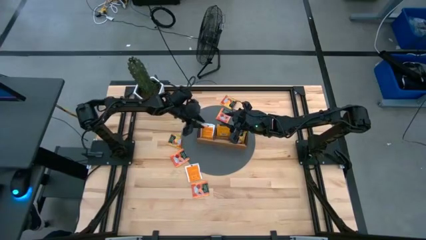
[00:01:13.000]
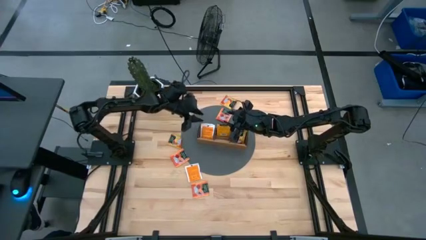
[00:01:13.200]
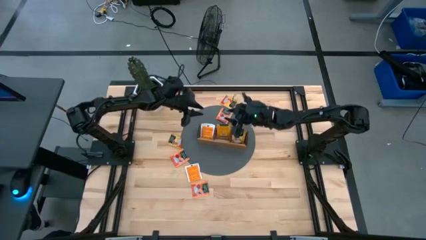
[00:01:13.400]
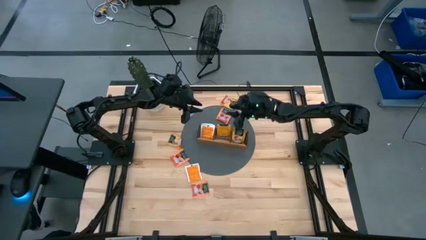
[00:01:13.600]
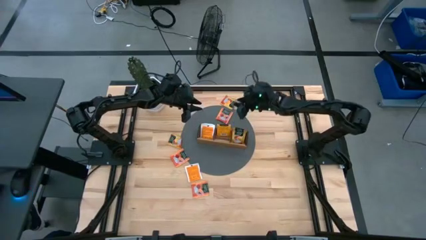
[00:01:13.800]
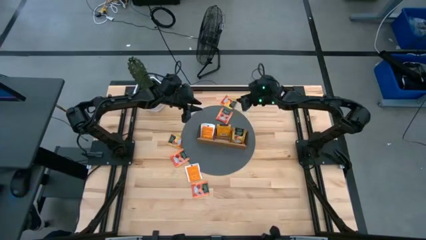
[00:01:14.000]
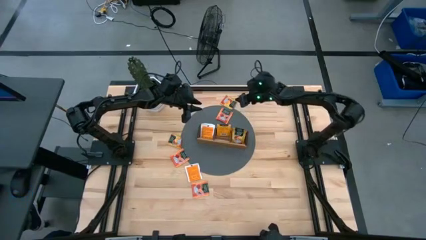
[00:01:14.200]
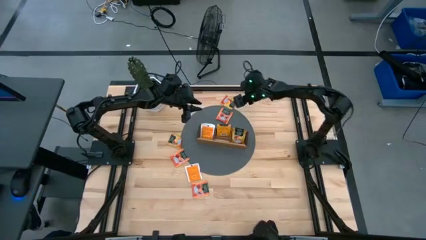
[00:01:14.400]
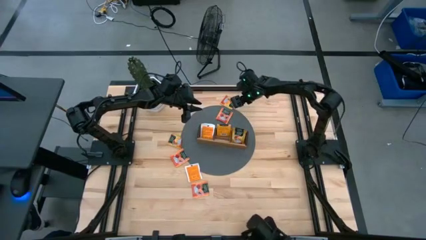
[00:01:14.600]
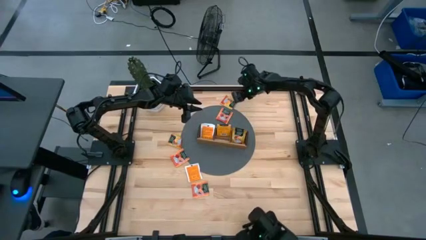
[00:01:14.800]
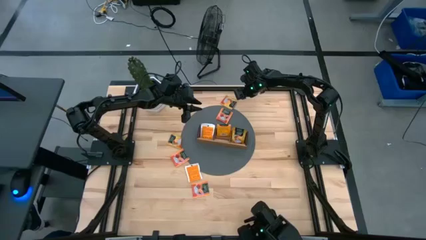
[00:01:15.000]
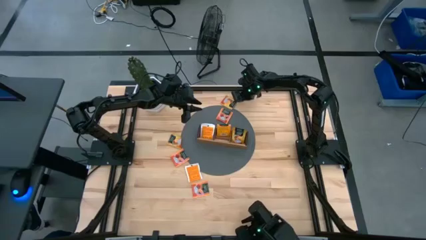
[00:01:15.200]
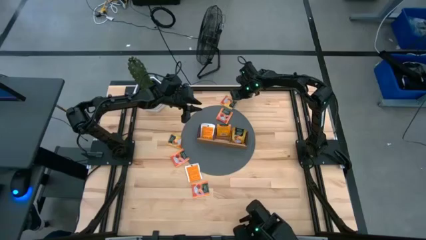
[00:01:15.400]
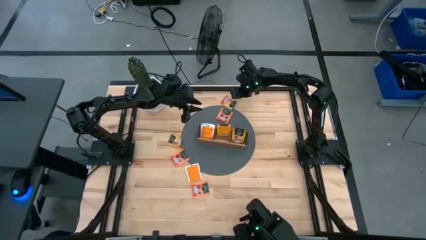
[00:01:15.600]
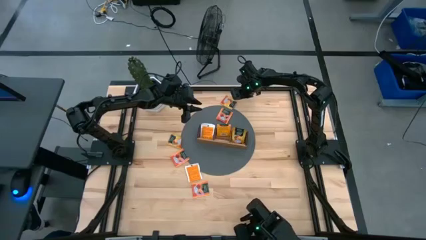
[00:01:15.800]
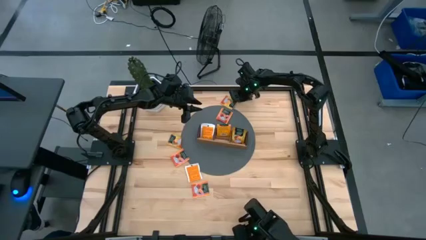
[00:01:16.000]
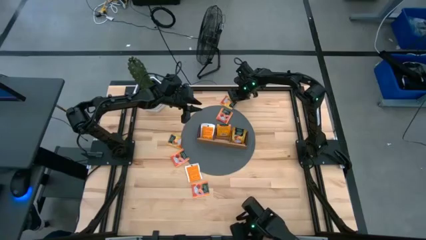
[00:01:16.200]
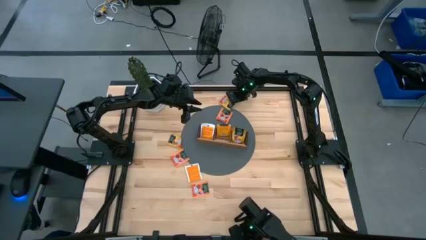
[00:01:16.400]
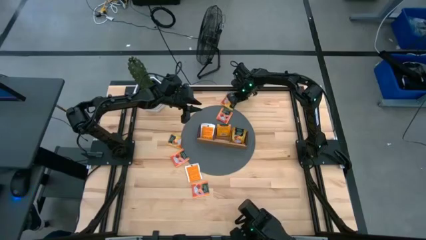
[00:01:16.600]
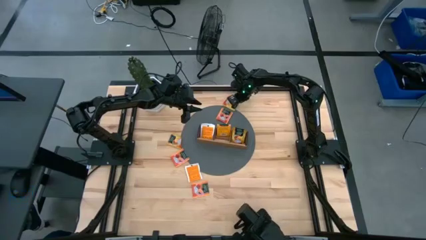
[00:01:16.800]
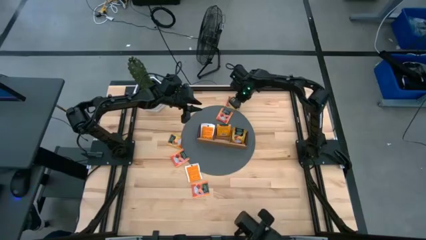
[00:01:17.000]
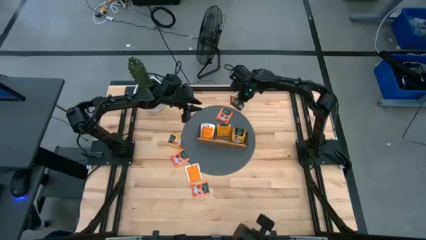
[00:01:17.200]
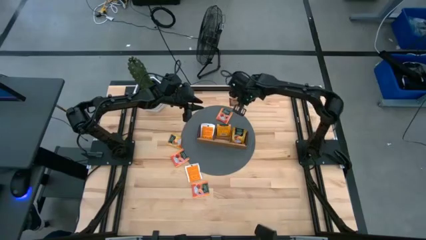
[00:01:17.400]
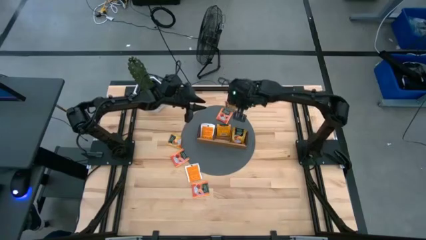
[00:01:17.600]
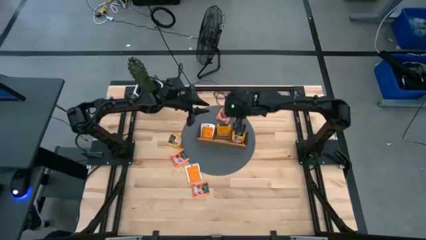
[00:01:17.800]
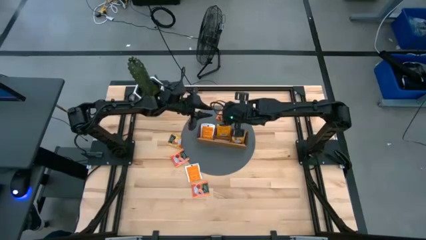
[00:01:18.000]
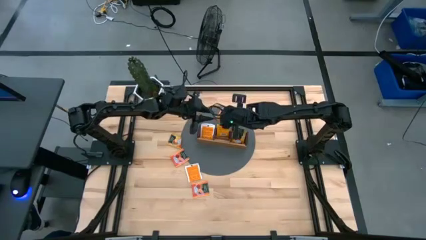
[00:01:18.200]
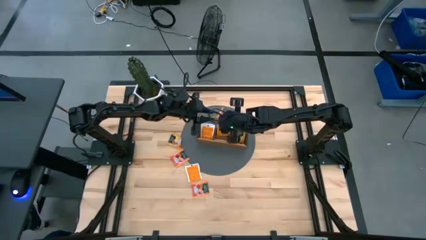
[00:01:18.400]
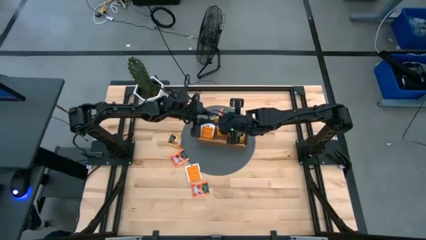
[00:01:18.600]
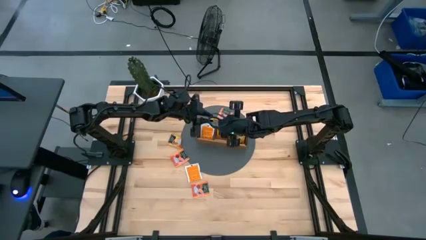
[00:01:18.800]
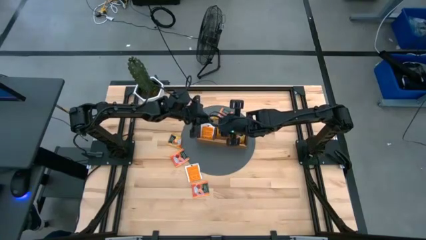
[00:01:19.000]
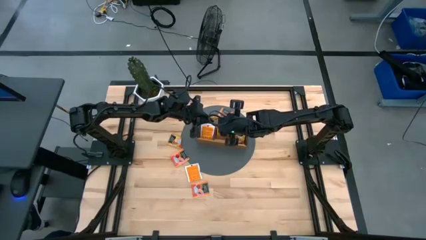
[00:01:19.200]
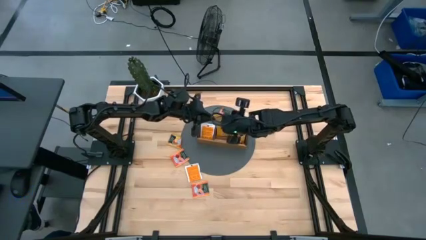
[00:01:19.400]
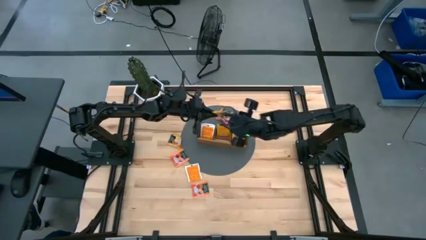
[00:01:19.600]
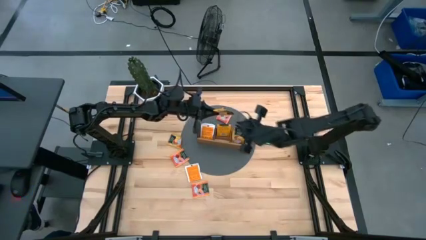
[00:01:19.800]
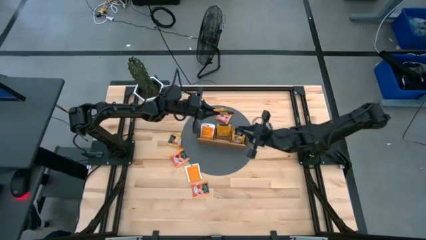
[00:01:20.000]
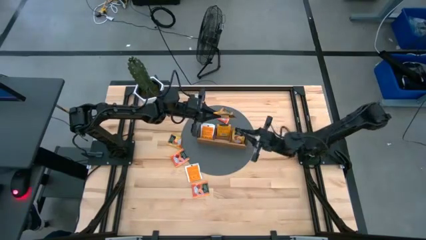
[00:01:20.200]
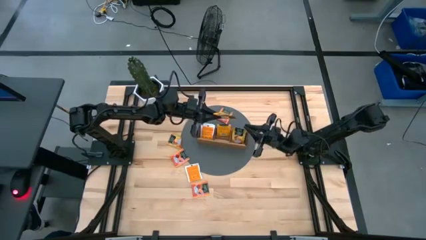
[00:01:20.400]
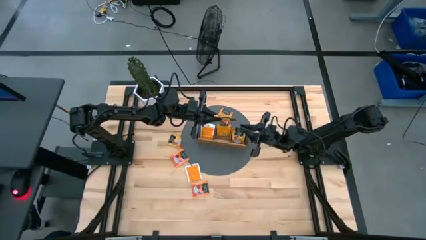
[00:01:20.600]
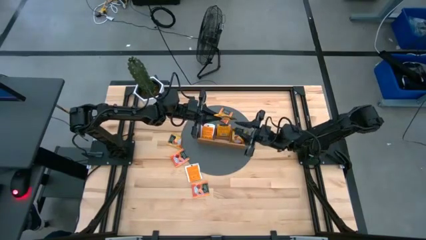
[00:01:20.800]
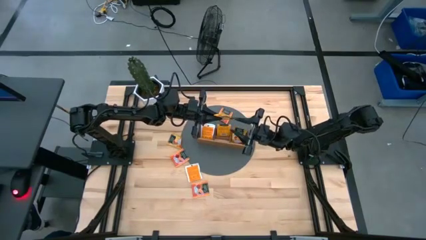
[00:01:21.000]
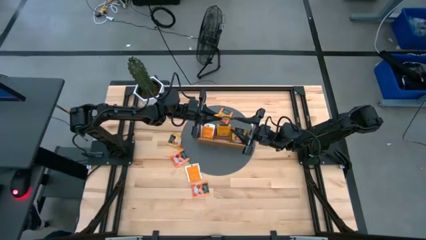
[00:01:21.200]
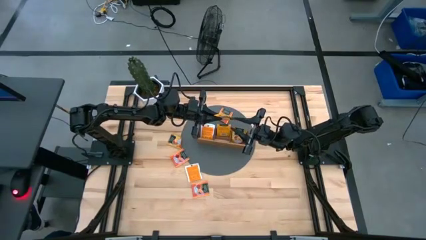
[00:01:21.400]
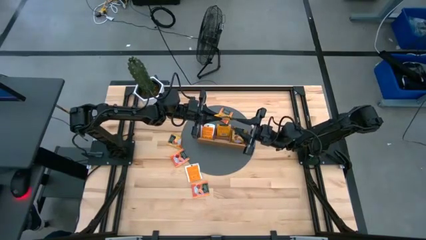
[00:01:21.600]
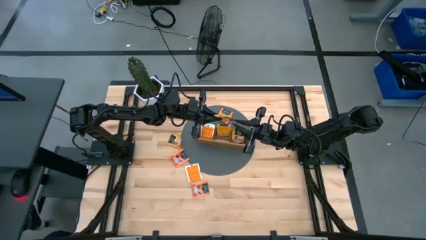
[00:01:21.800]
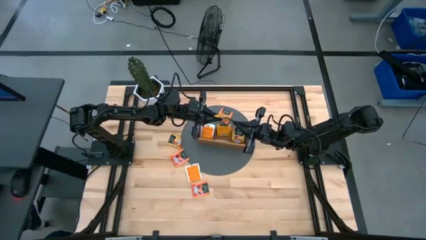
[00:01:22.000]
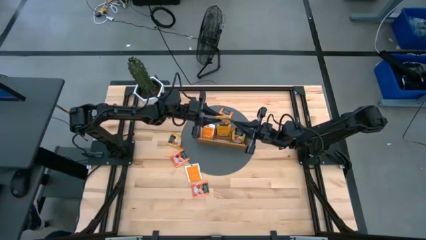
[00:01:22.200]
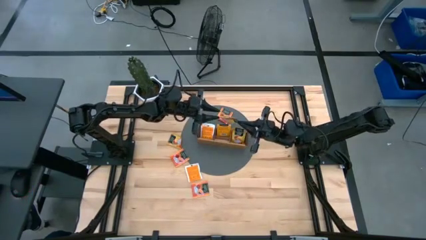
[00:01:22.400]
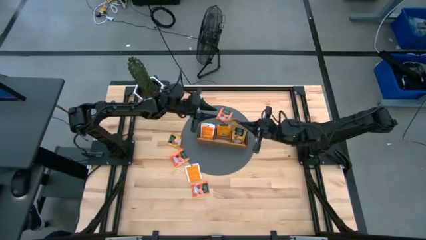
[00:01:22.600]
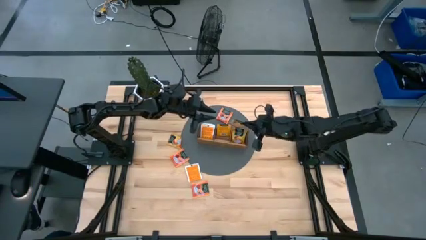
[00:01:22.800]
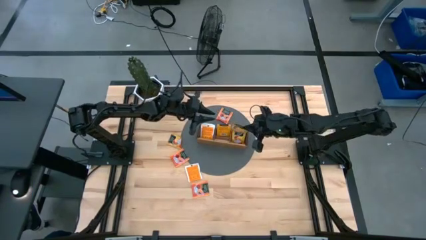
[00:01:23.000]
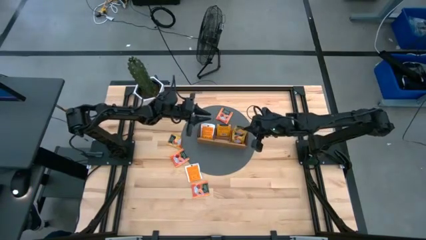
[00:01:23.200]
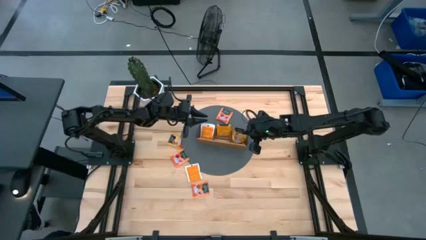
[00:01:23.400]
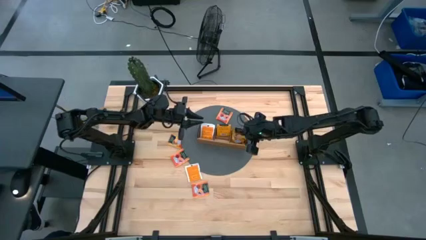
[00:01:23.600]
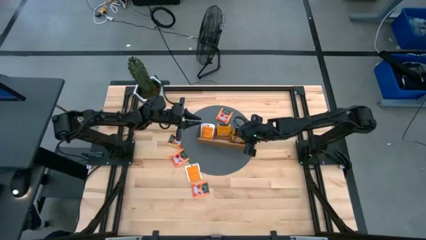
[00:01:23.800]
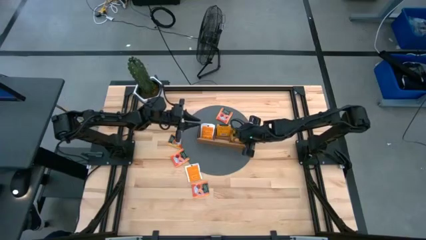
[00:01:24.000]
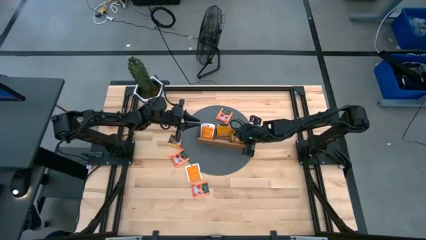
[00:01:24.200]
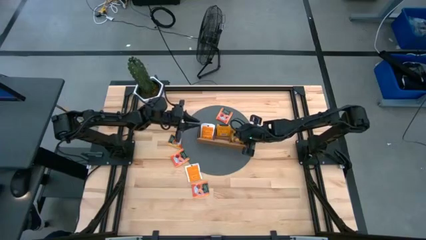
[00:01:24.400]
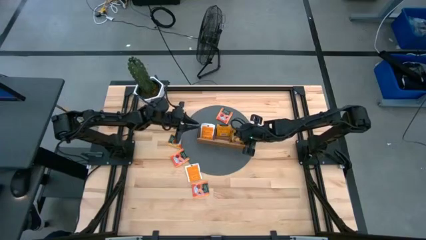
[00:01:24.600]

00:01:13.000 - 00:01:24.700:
Task: Pick & Place Tea
Put the yellow tea bag into the right section of the wooden organizer
